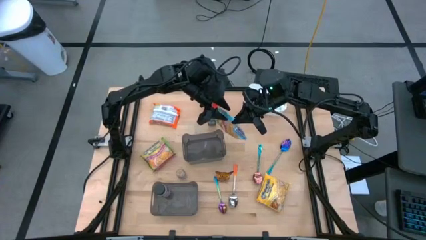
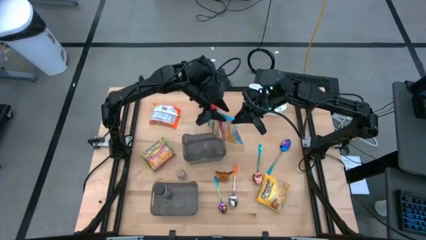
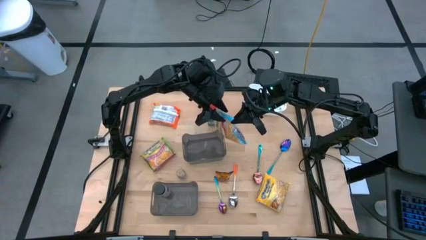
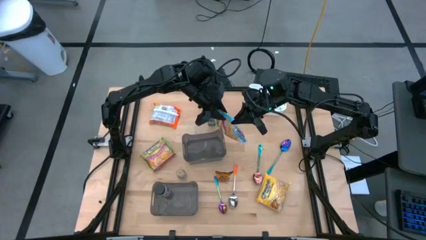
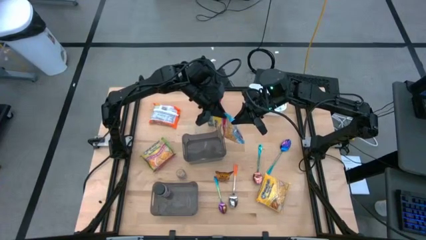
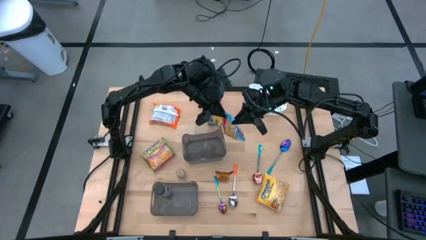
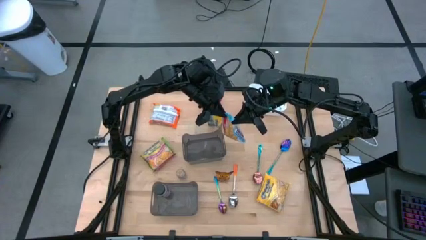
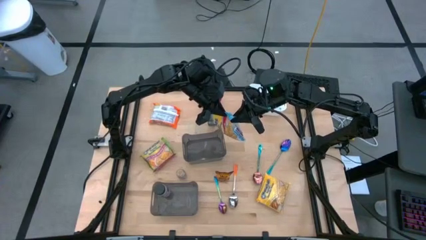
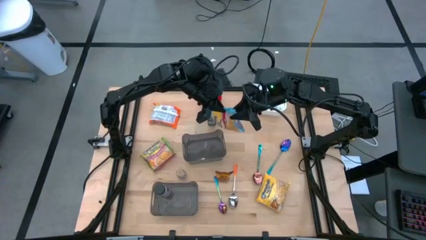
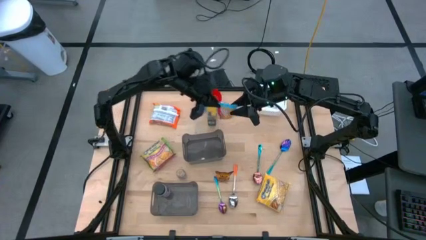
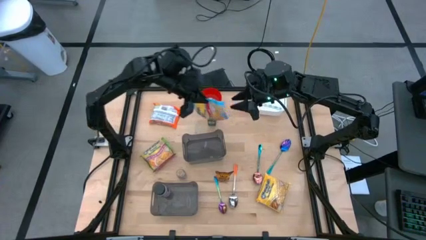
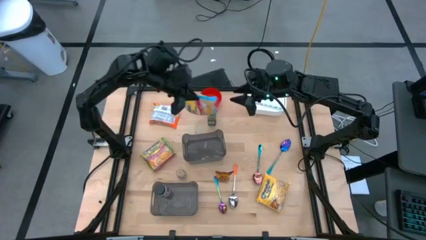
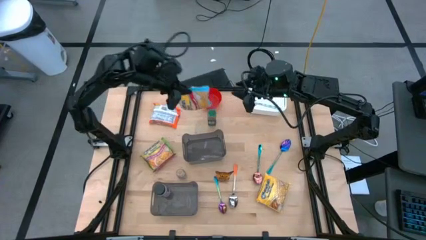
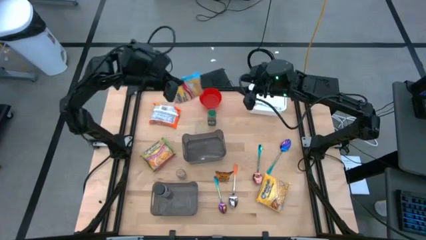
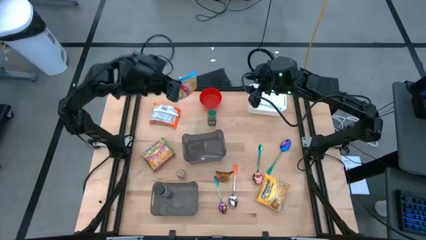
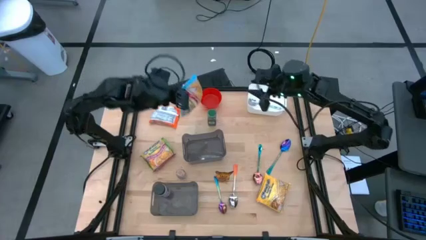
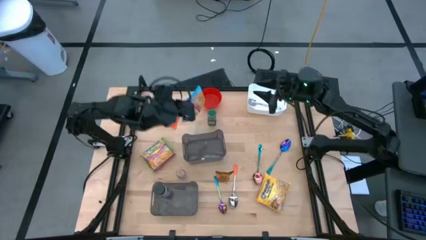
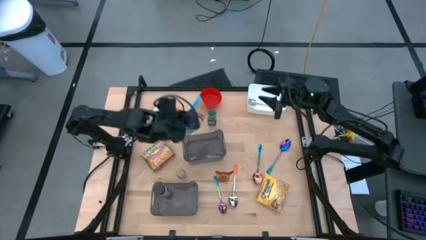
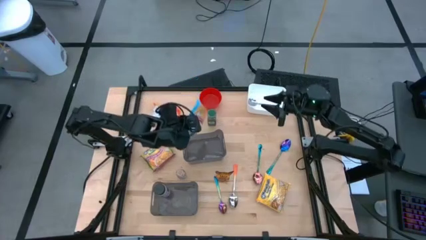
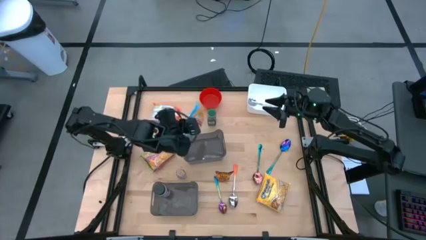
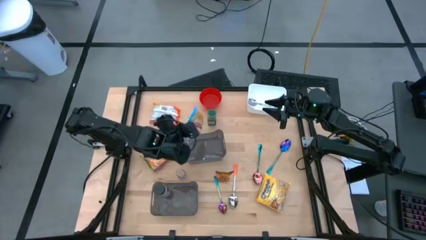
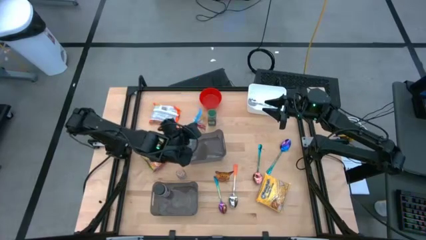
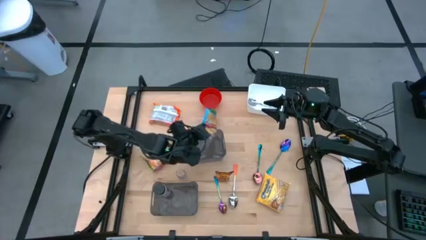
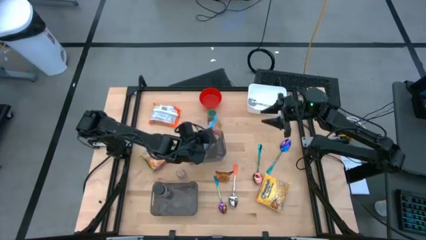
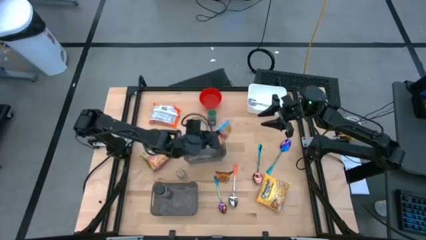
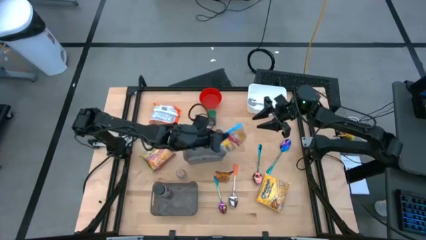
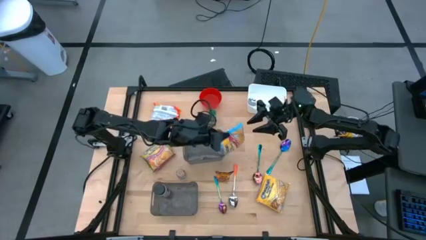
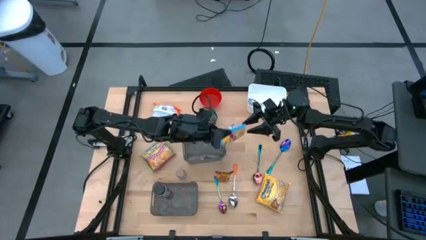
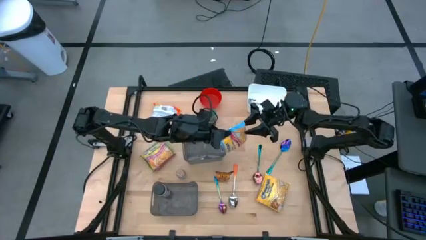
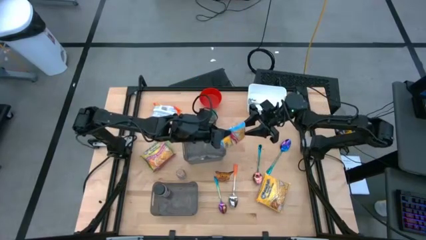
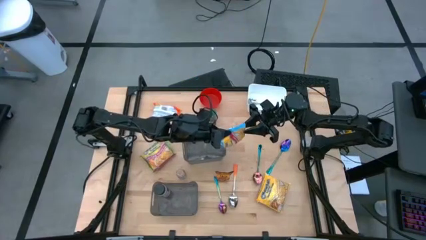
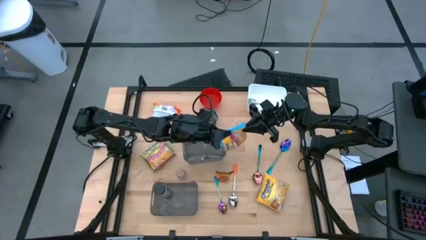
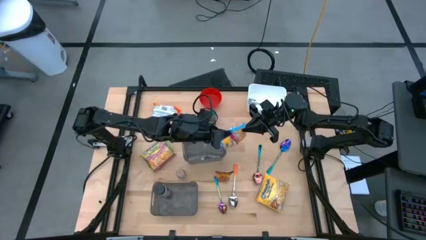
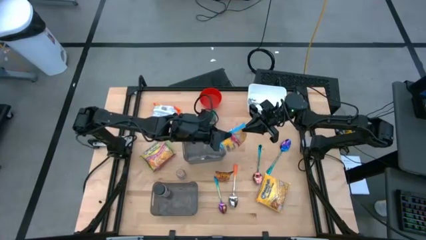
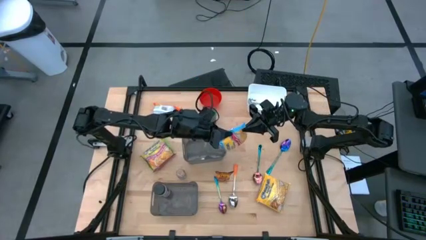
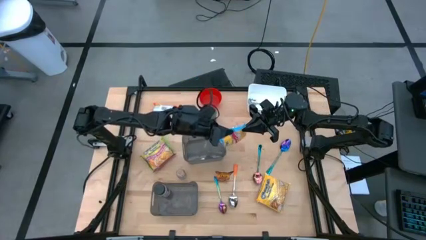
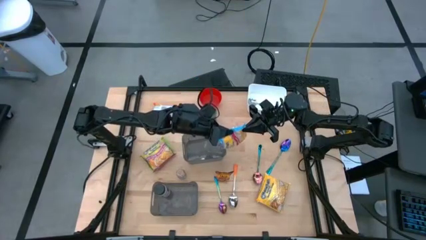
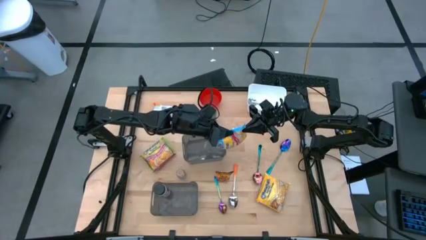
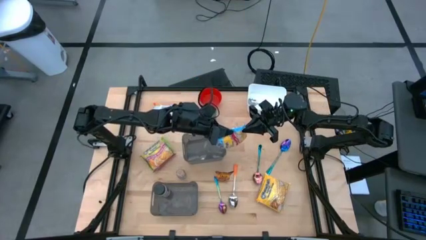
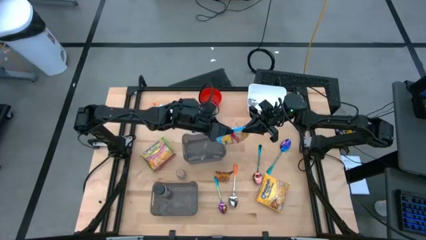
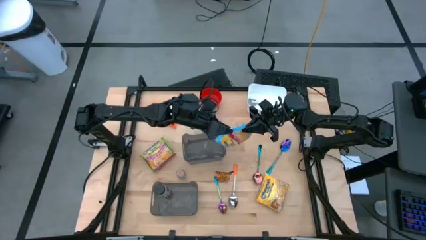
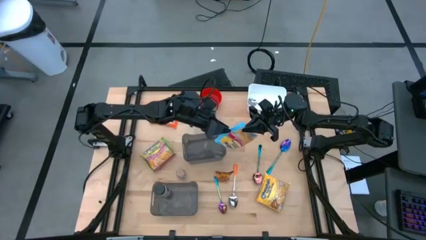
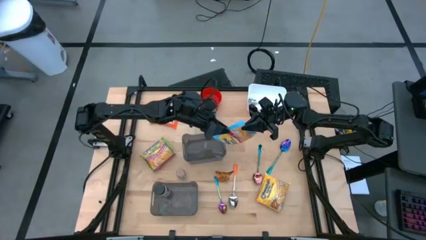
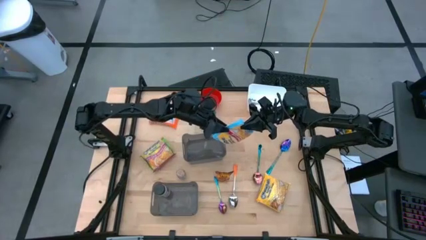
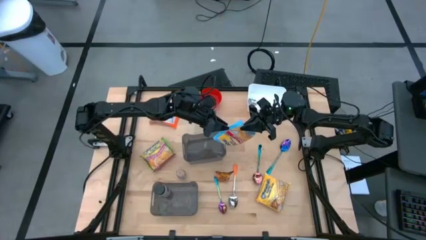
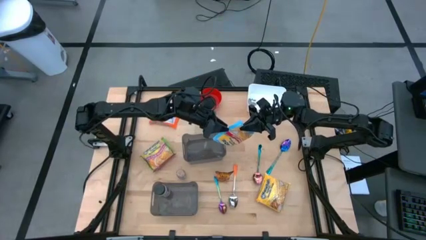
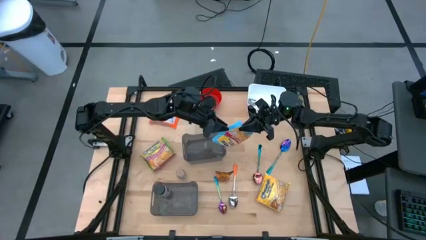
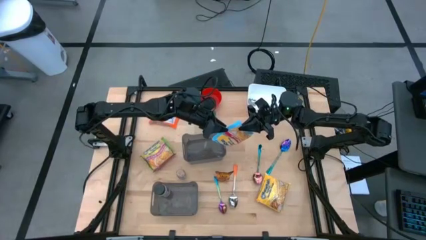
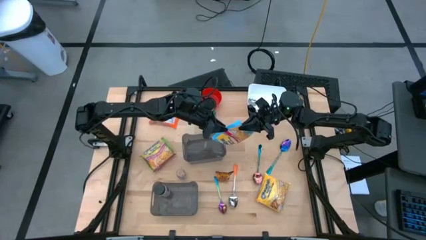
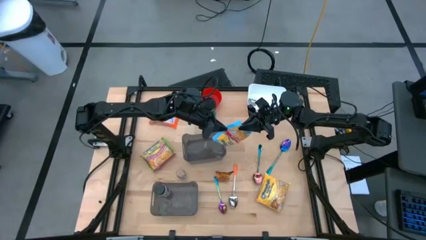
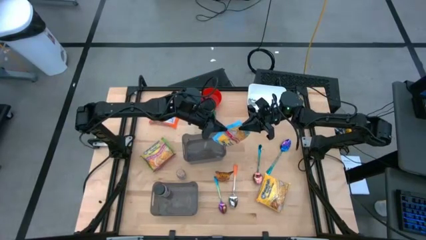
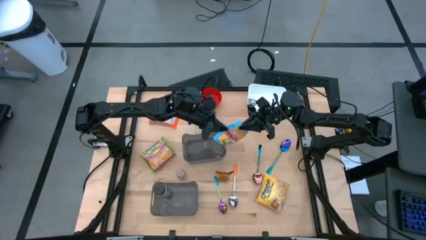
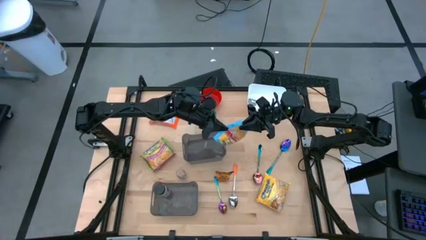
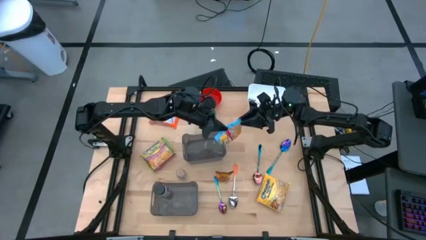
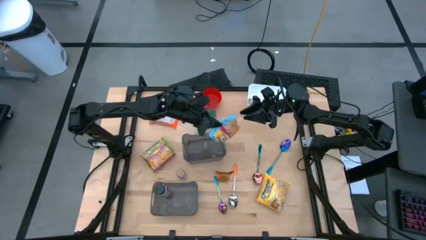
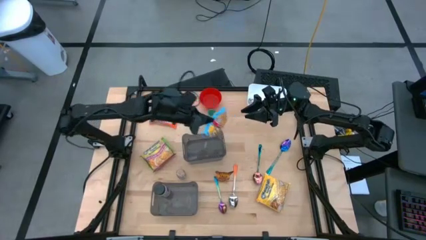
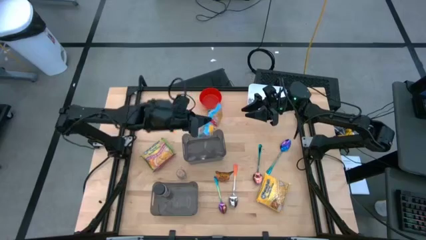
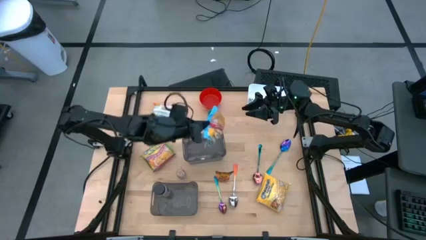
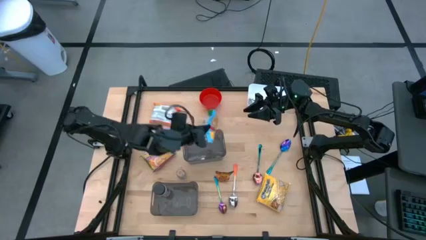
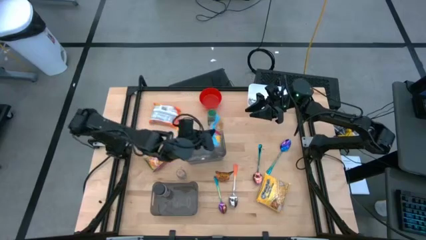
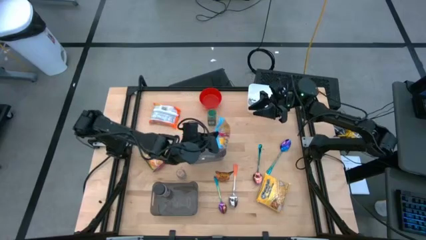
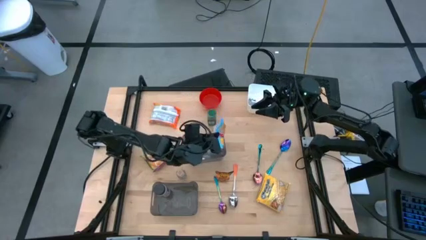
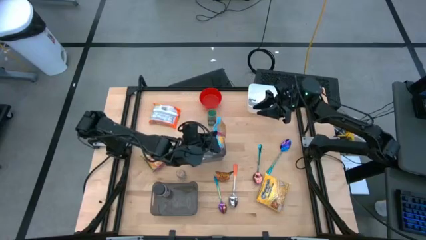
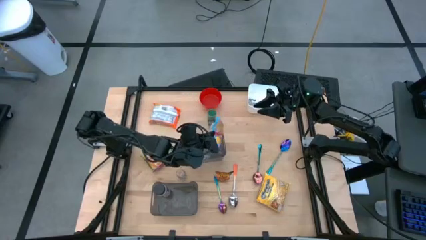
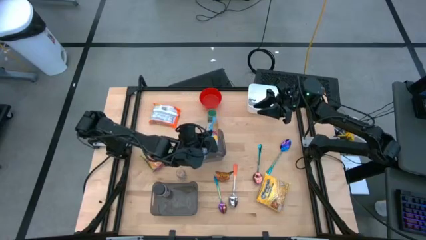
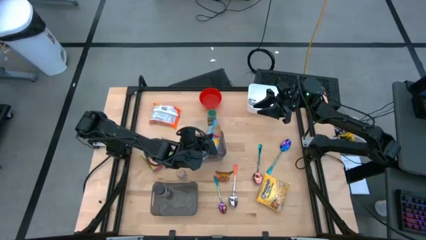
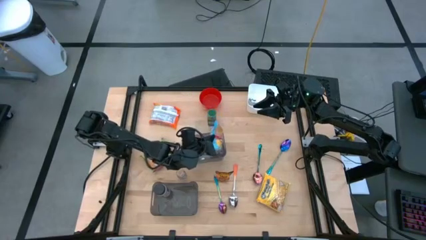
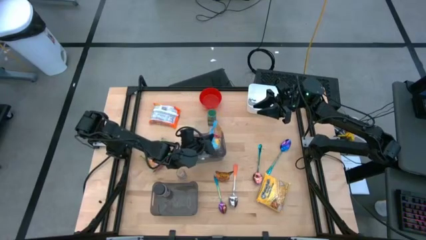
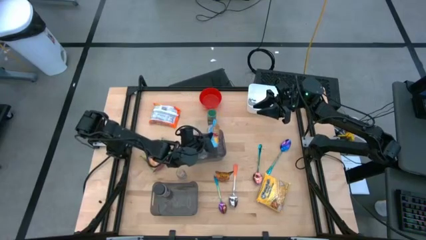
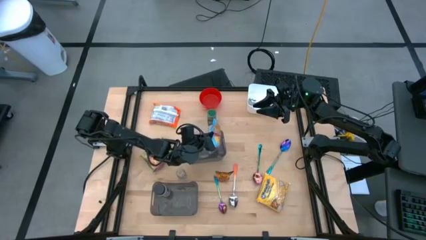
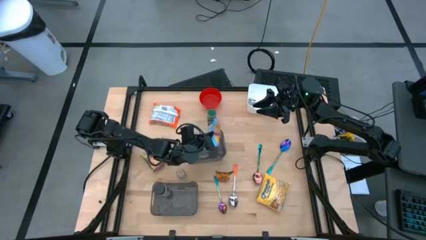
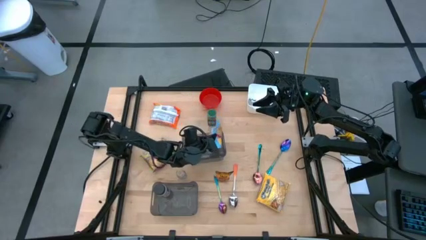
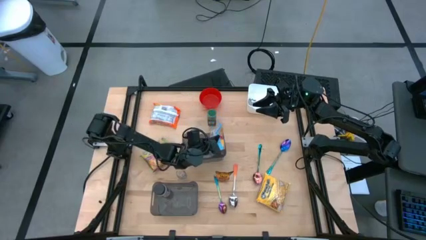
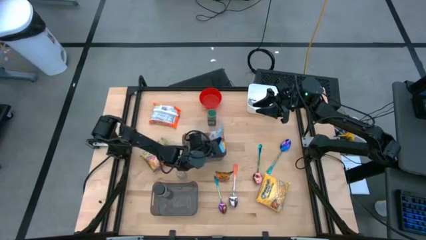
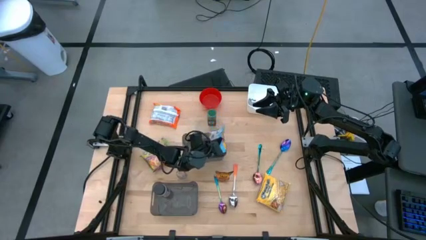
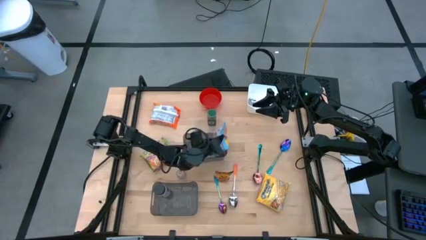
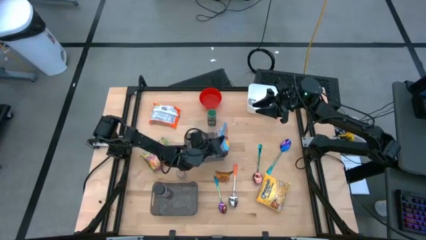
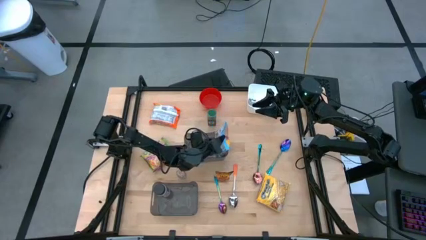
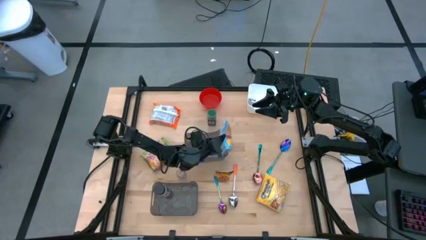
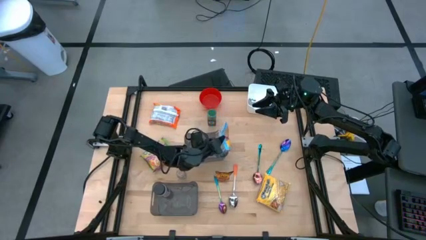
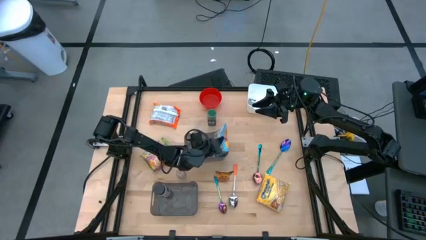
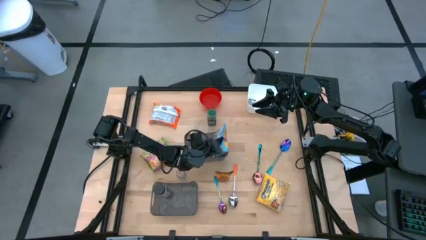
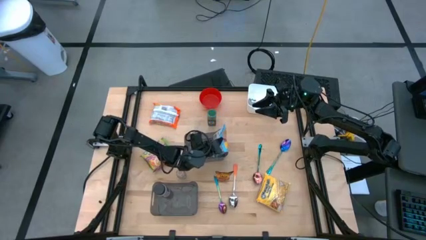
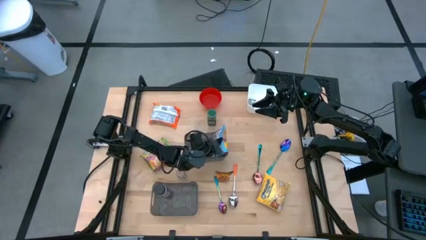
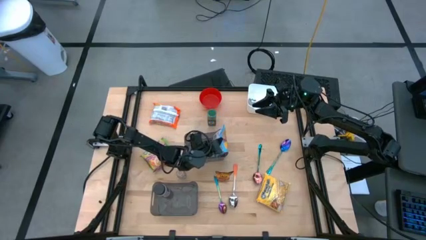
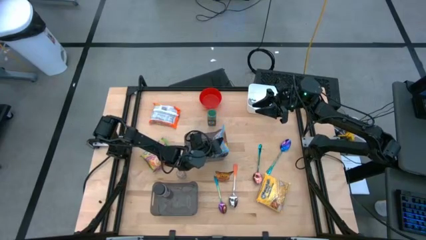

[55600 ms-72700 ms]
Task: Pick & Place Food Item
Put the blue noodle pack into the top black bin
